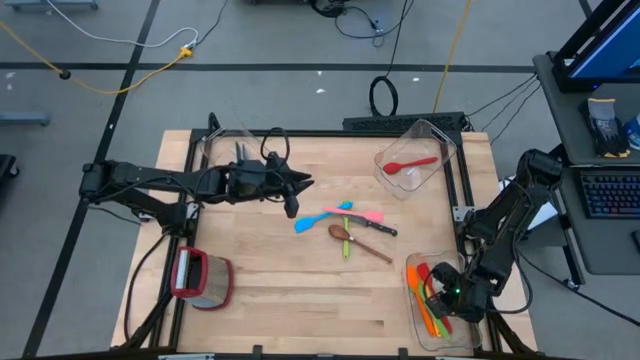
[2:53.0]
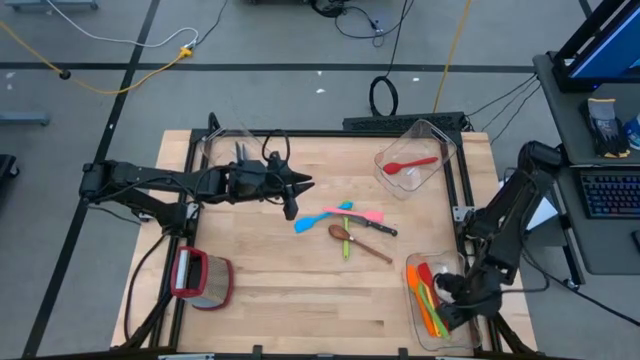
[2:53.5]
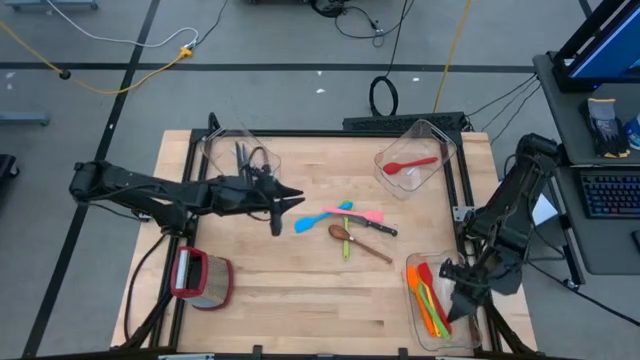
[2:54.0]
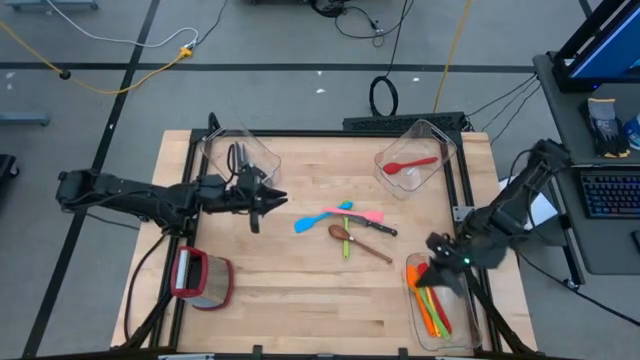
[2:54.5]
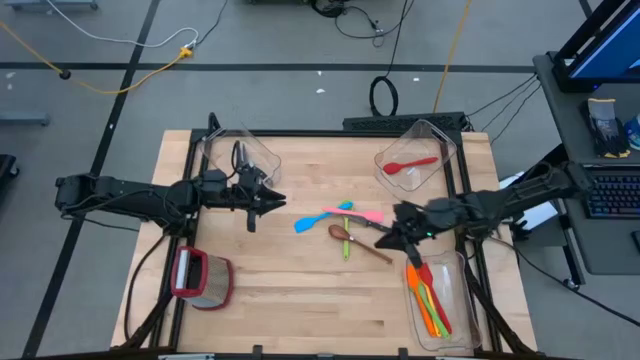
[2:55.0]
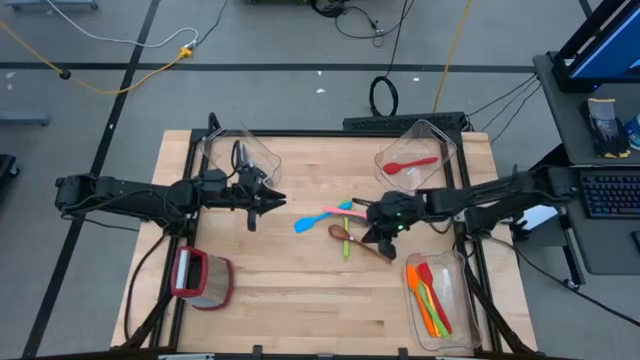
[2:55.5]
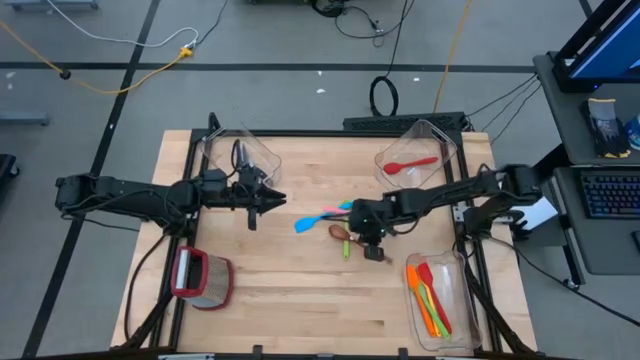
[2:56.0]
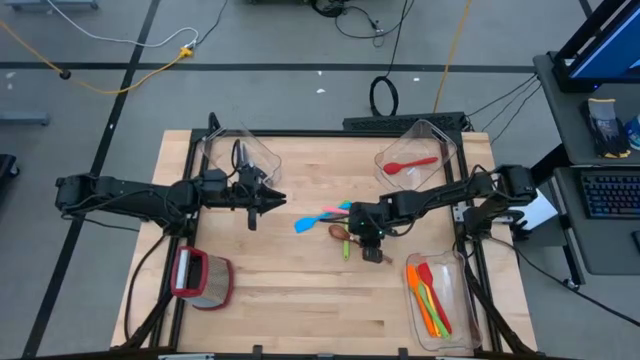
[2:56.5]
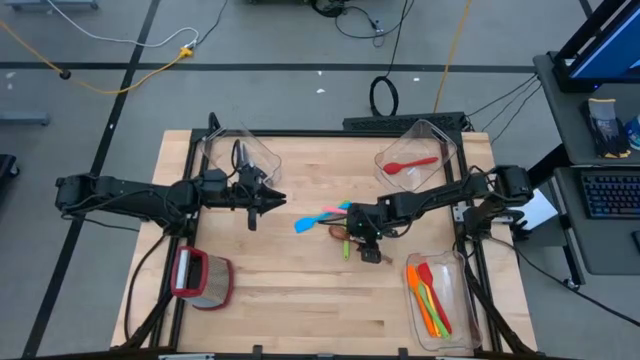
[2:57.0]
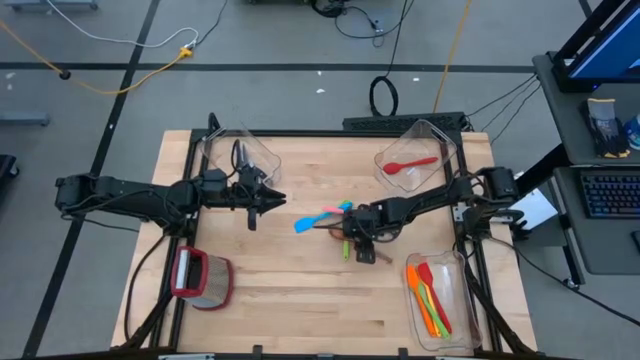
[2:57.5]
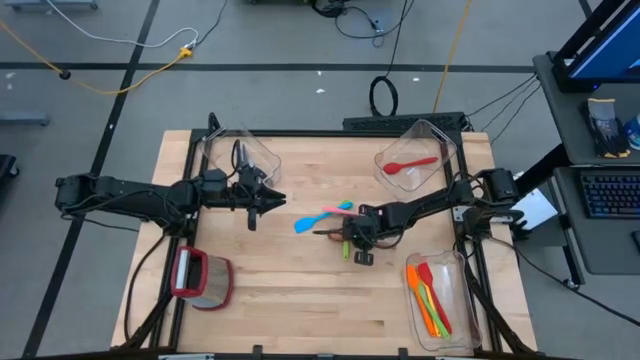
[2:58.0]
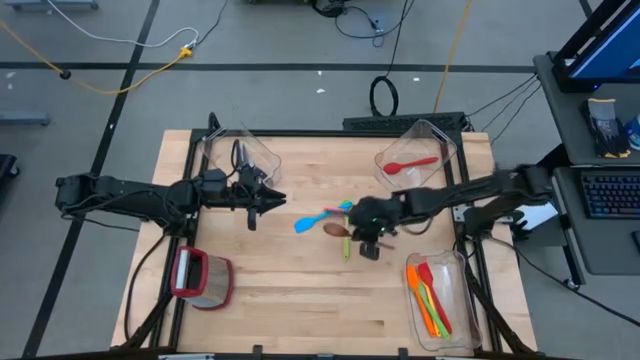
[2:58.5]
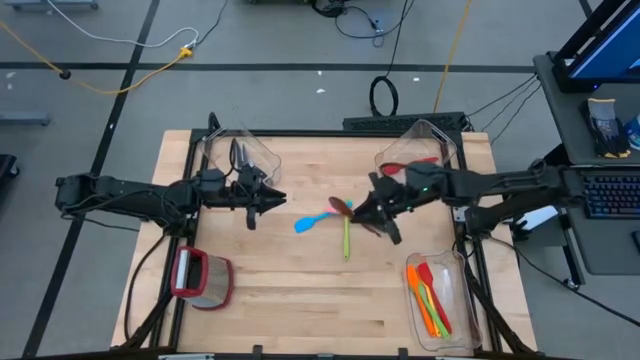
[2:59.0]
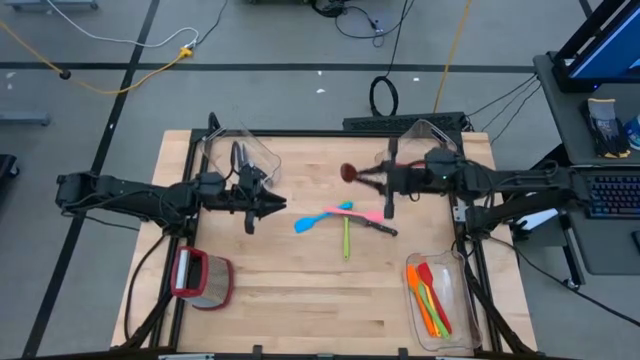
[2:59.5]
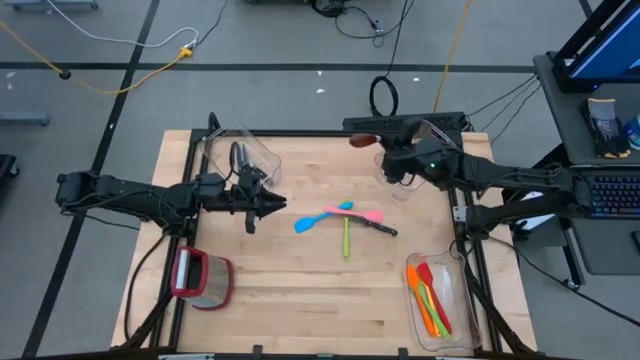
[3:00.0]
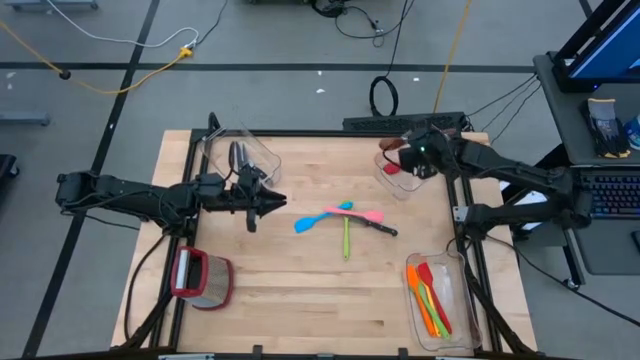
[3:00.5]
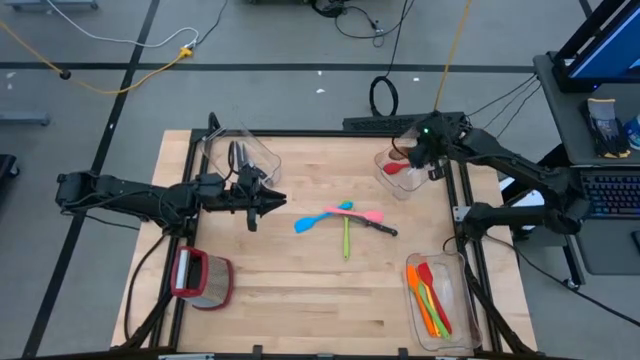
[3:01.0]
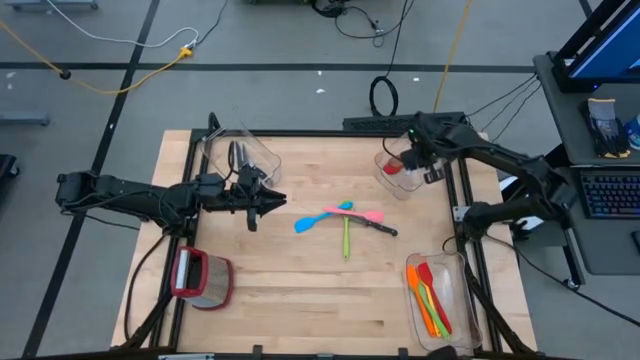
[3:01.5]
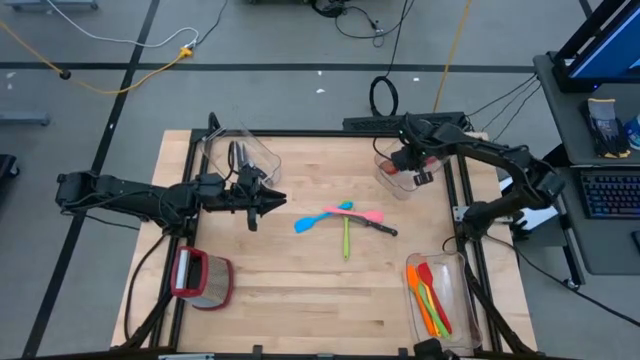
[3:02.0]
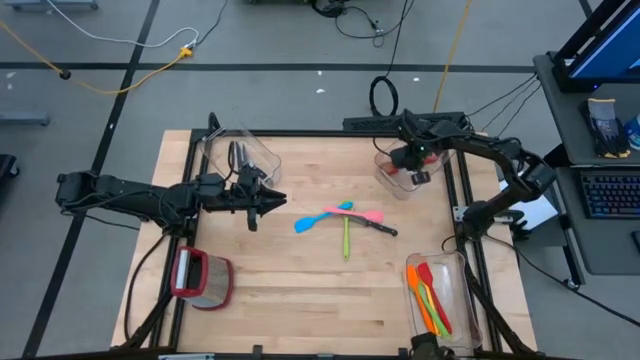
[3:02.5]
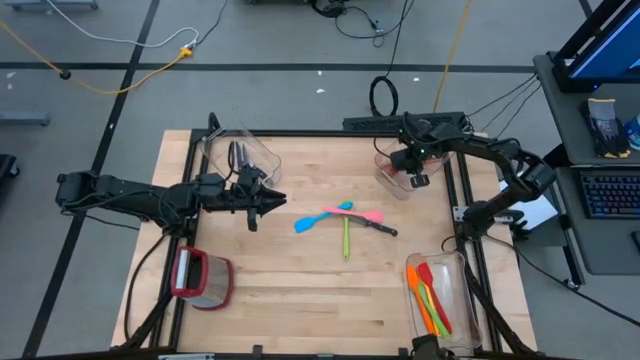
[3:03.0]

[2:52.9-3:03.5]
Task: Pick & Place Kitchen Items
Put the brown serving spoon into the top right transparent bin

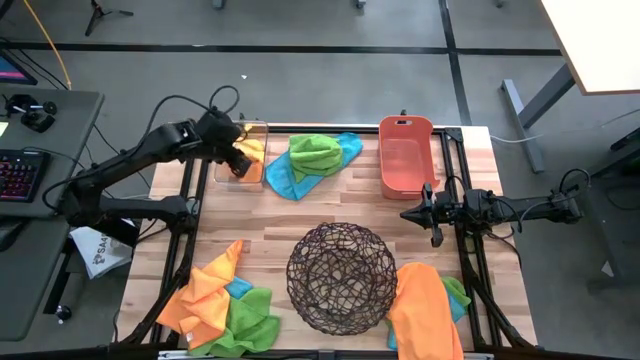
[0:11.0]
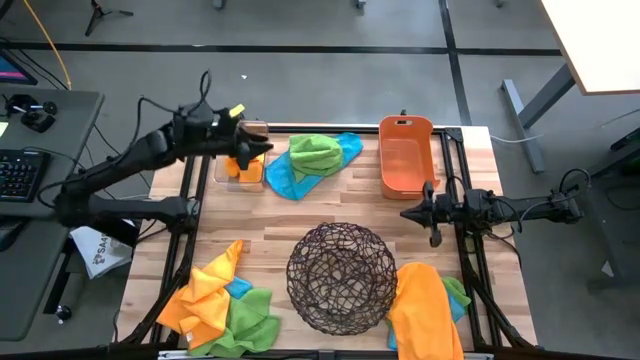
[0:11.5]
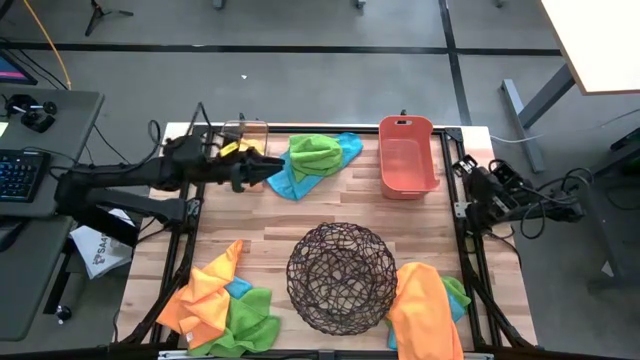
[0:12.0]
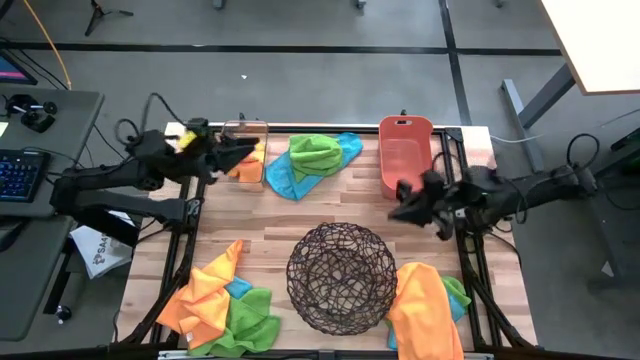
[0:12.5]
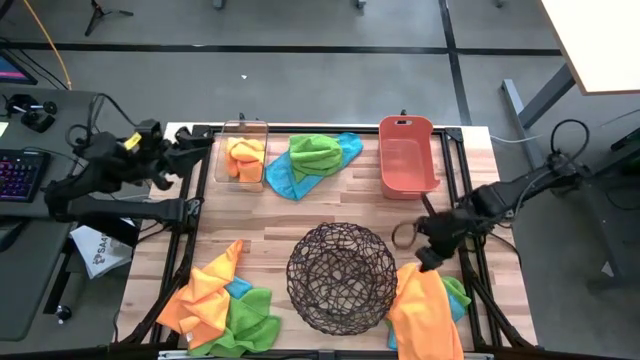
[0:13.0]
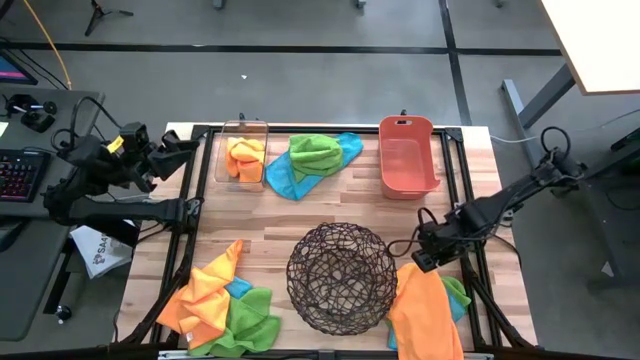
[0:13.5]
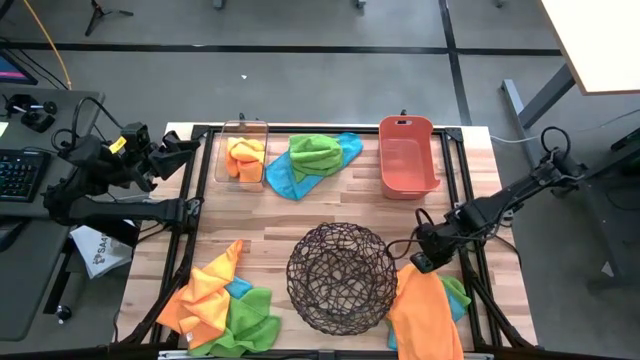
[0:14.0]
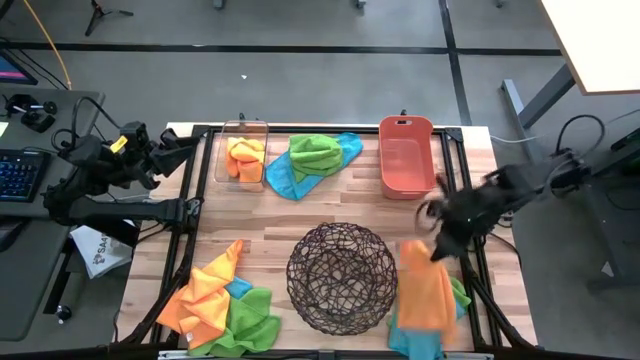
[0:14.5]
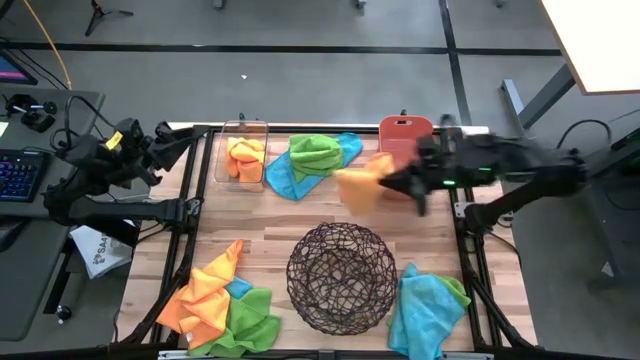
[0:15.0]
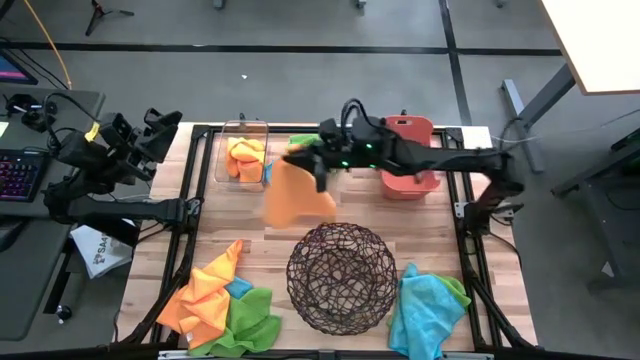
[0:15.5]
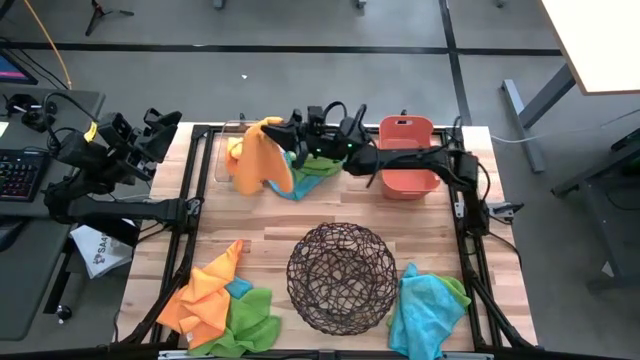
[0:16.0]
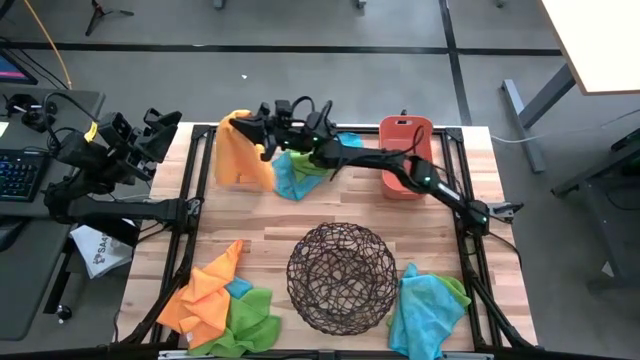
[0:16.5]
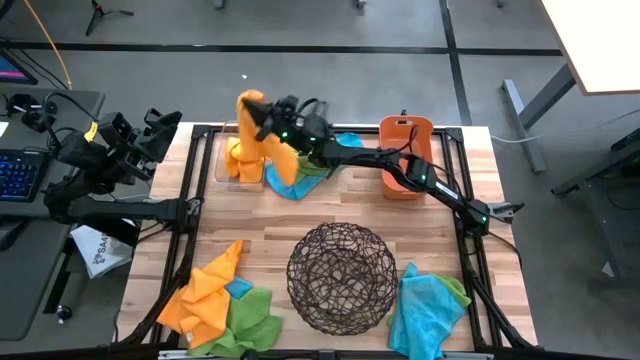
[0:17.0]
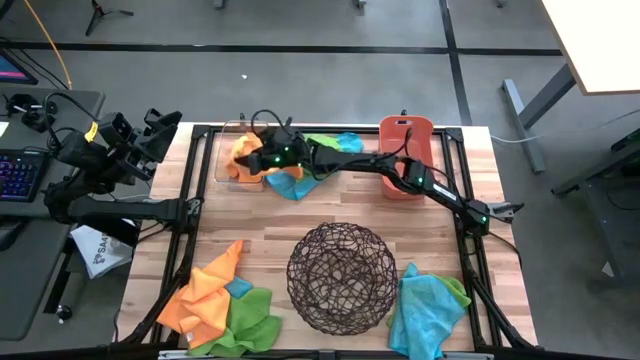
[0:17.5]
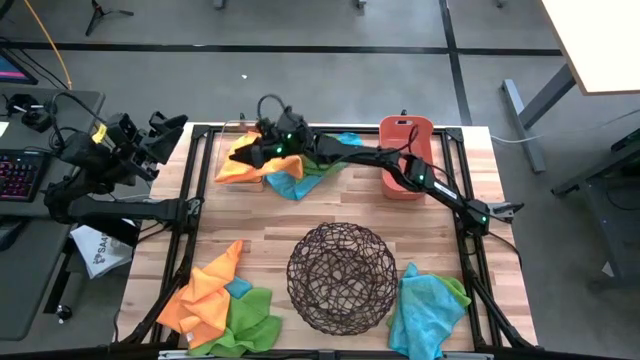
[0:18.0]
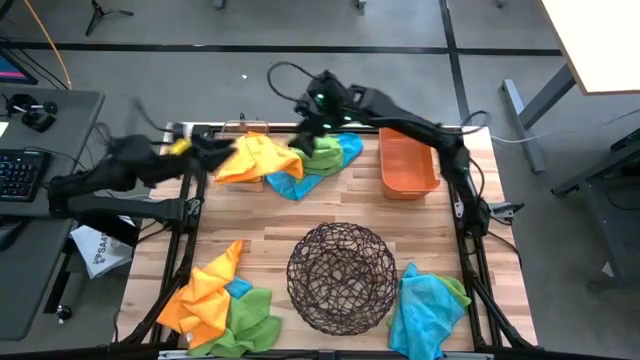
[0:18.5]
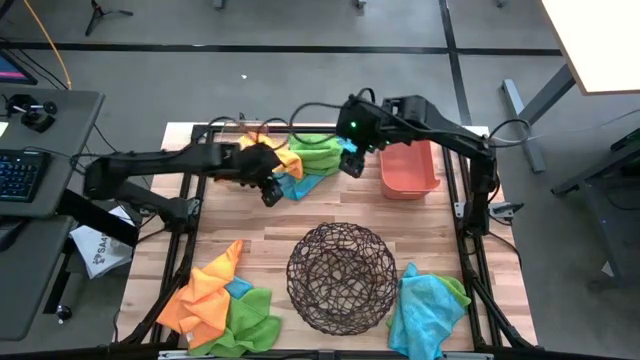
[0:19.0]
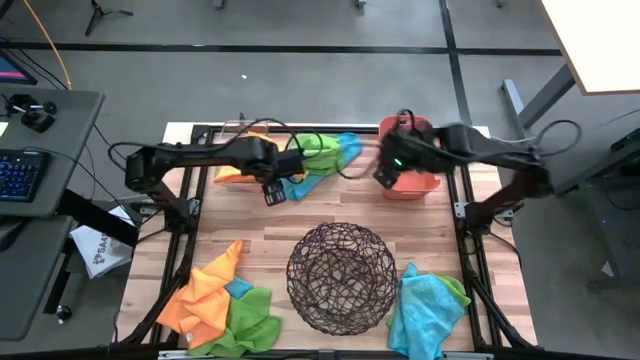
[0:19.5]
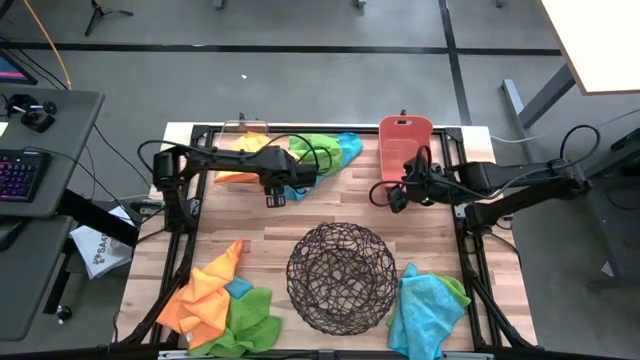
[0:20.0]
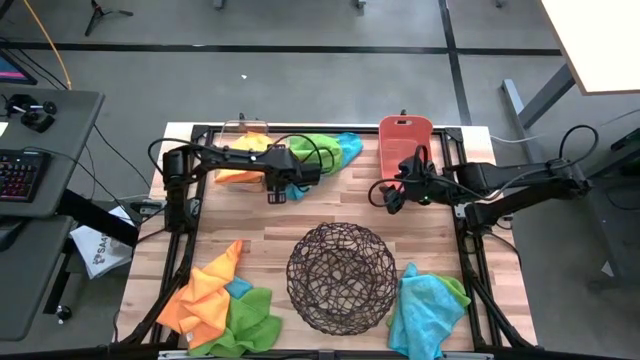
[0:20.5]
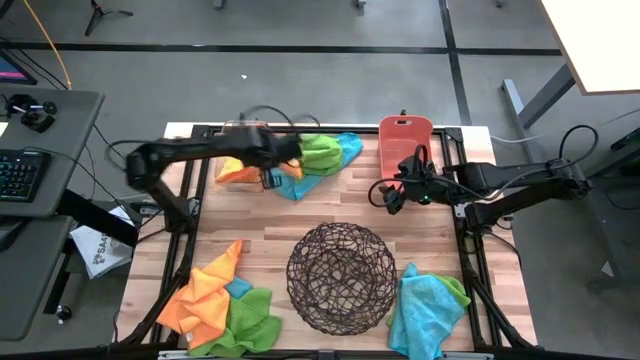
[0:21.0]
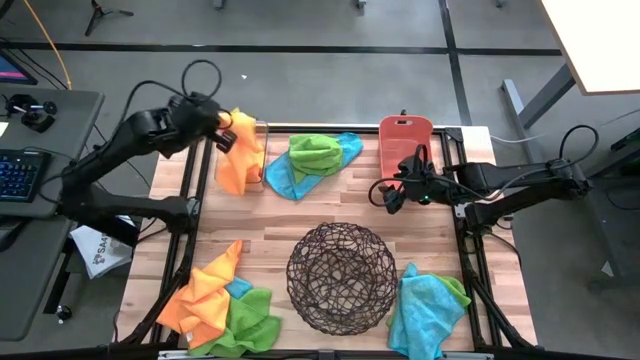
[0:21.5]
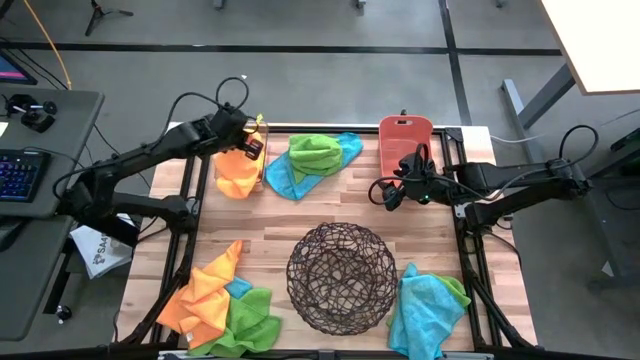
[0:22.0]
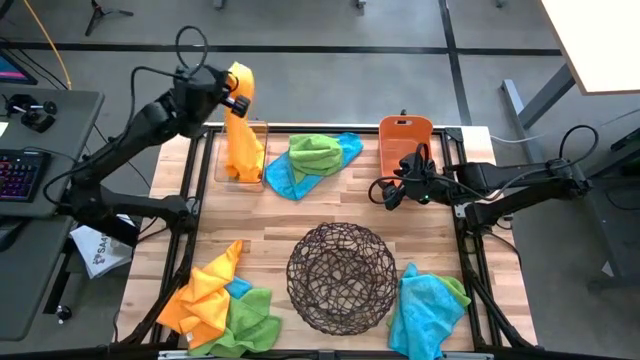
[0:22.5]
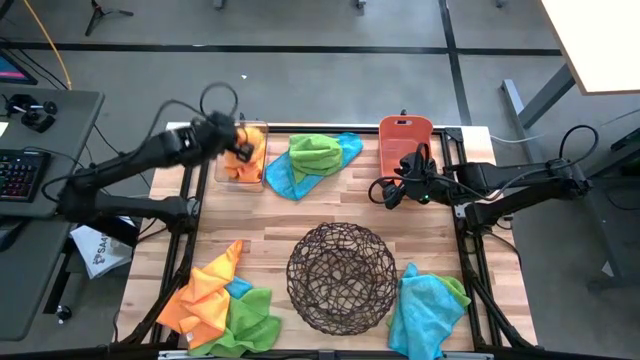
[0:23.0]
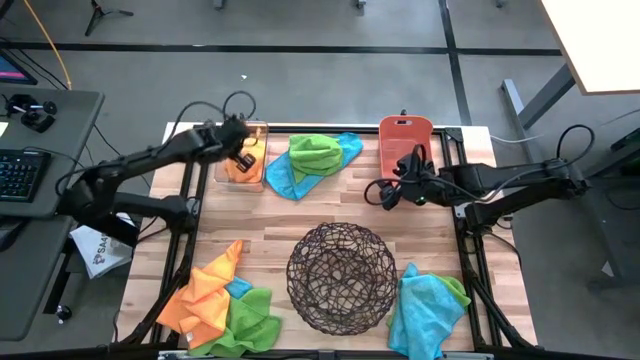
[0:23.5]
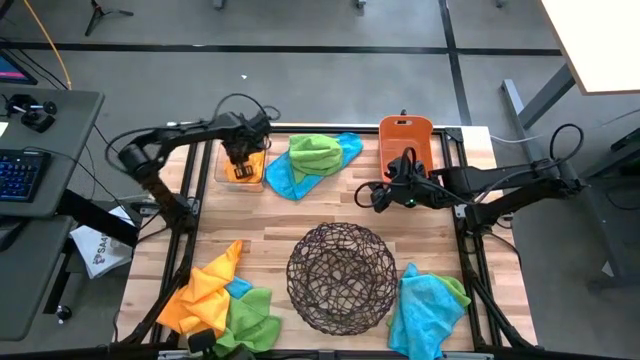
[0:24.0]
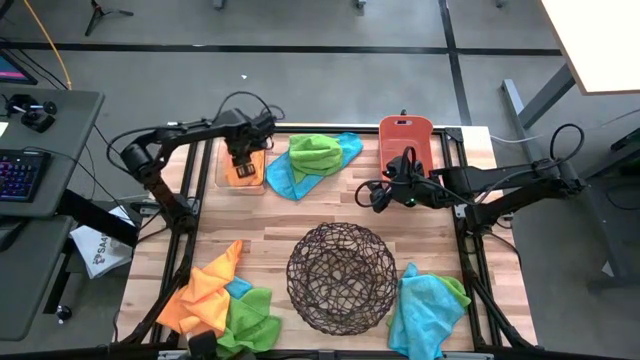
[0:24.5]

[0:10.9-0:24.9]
Task: Sort microfiber towel by color & place in baskets
Put the right orange towel into the transparent bin
